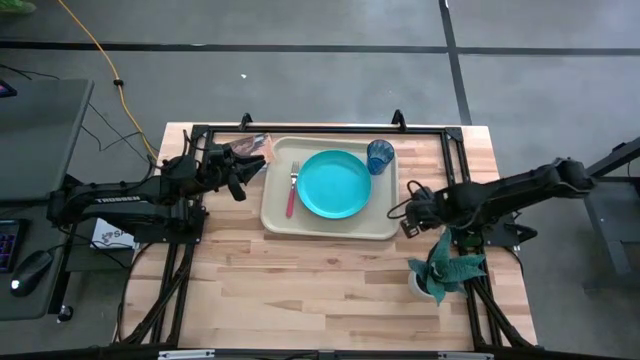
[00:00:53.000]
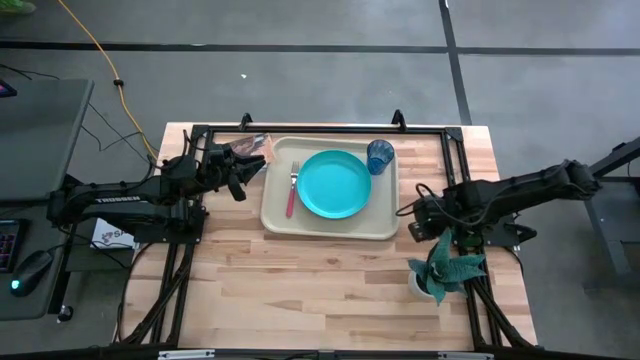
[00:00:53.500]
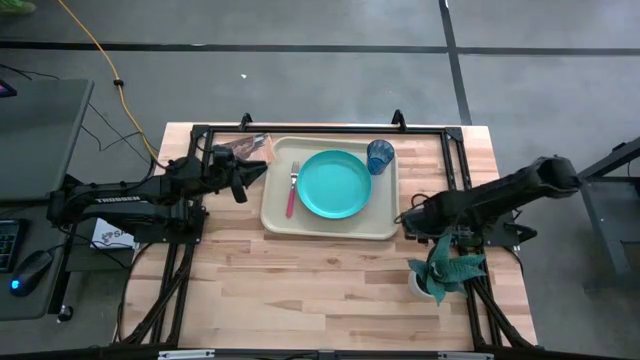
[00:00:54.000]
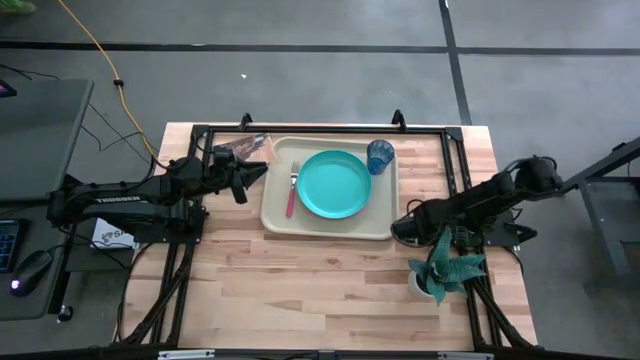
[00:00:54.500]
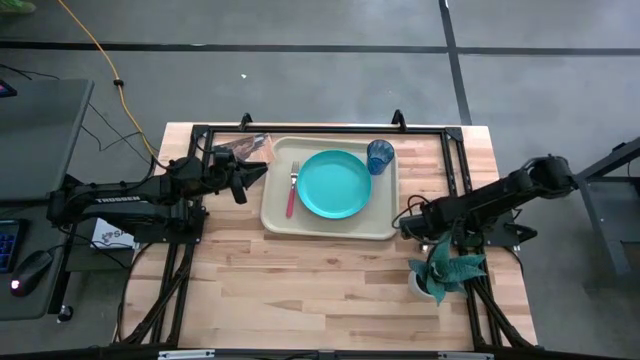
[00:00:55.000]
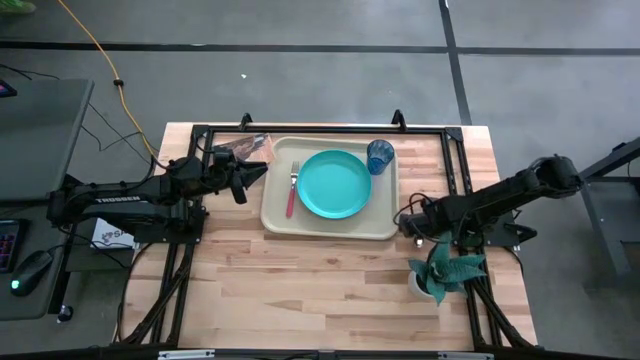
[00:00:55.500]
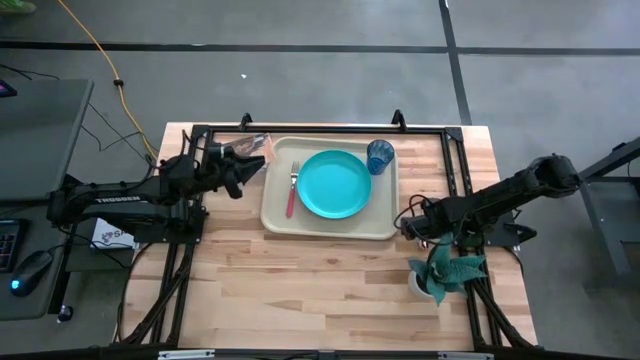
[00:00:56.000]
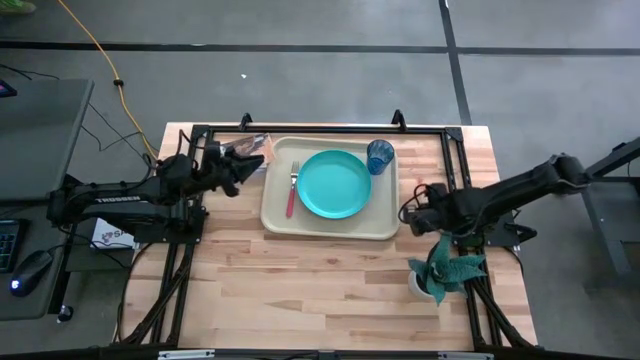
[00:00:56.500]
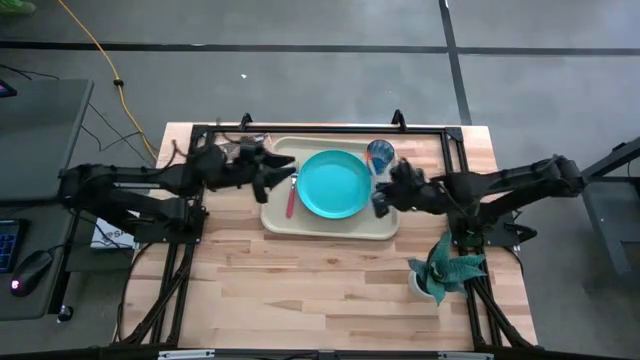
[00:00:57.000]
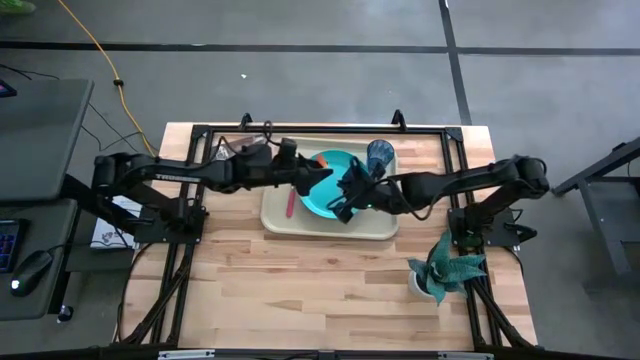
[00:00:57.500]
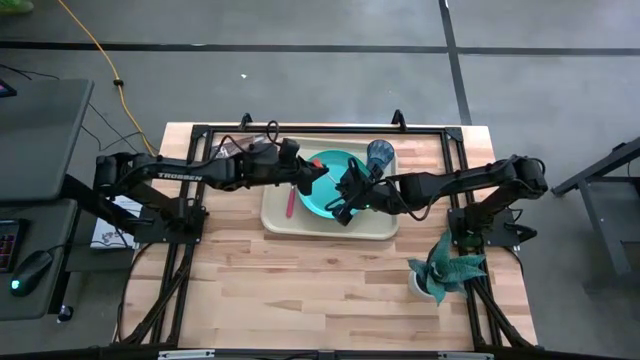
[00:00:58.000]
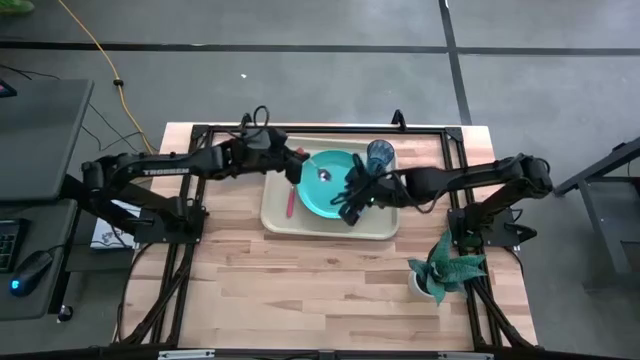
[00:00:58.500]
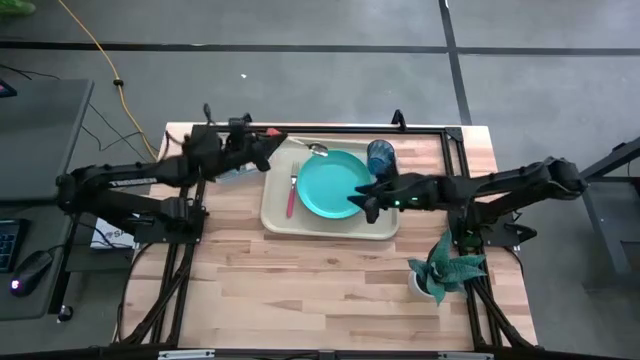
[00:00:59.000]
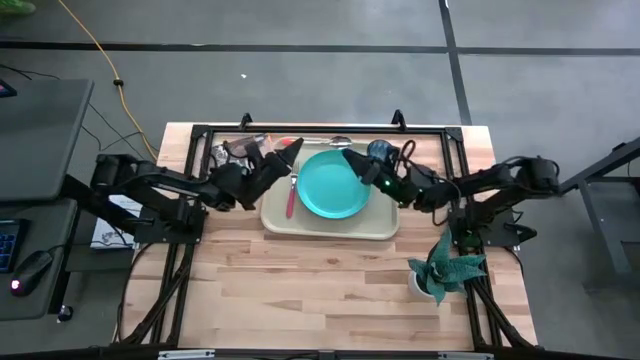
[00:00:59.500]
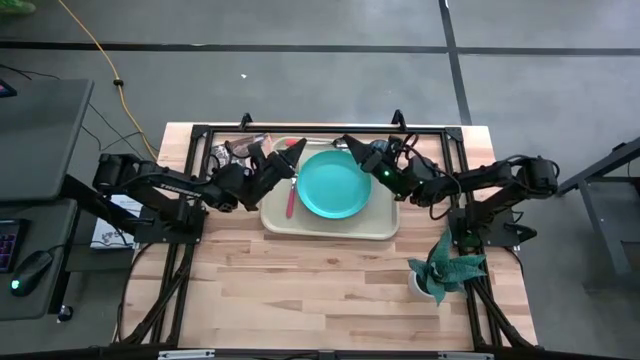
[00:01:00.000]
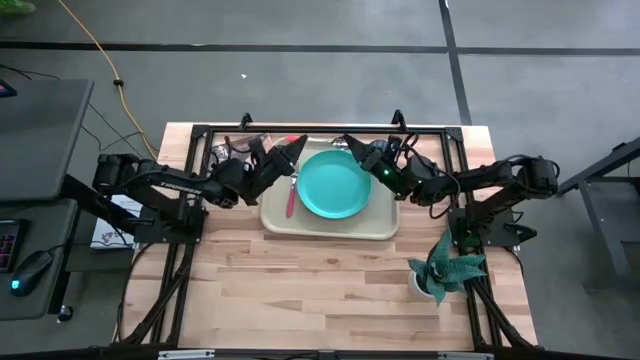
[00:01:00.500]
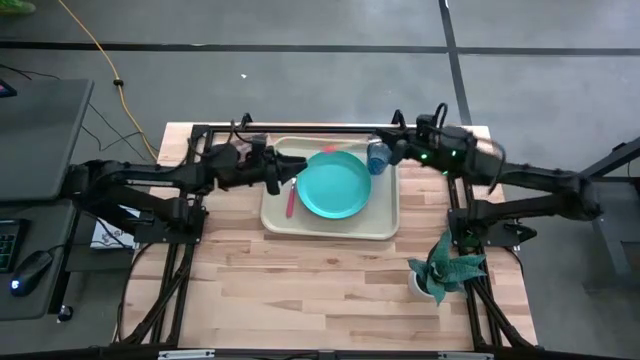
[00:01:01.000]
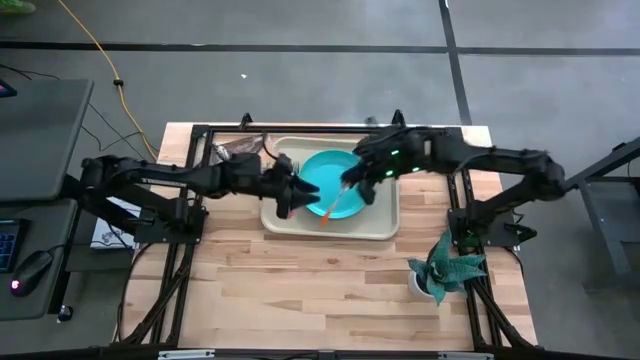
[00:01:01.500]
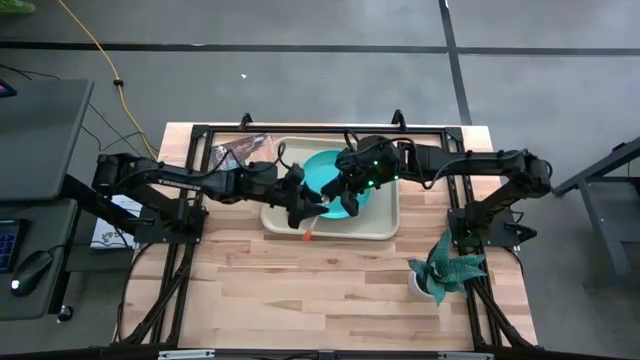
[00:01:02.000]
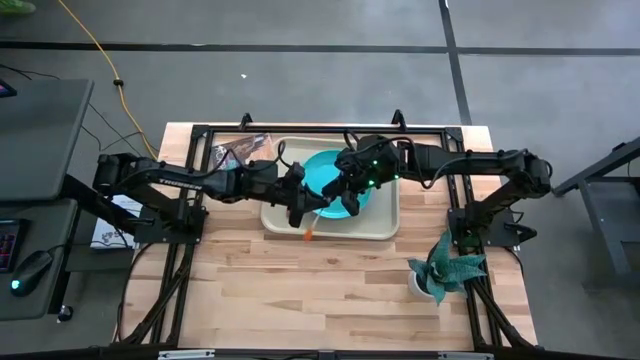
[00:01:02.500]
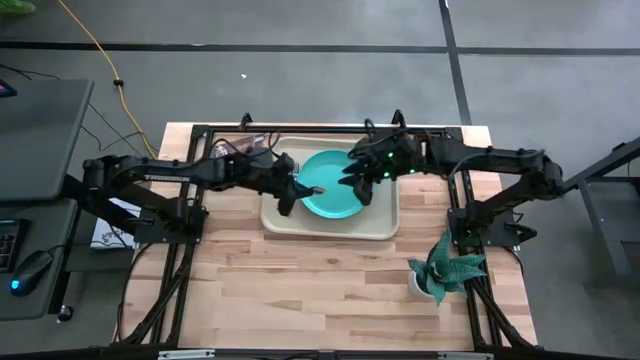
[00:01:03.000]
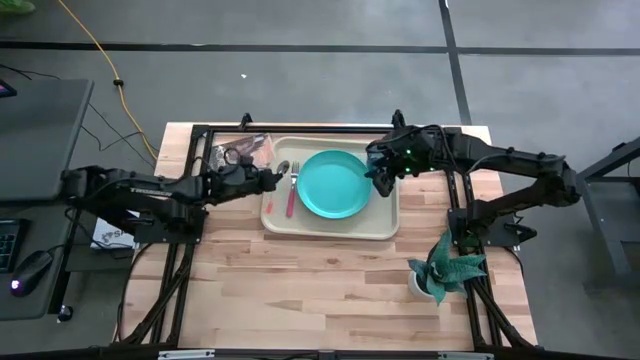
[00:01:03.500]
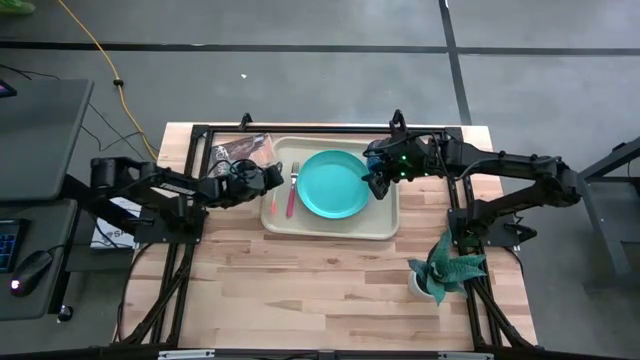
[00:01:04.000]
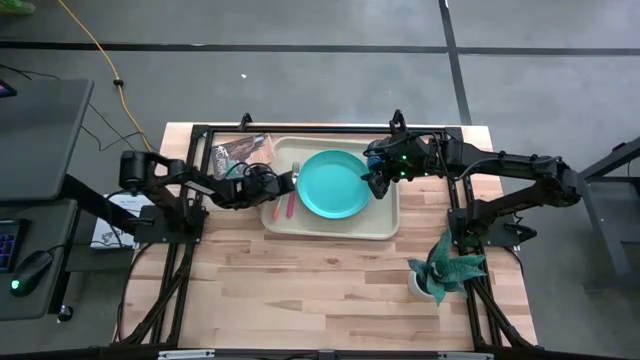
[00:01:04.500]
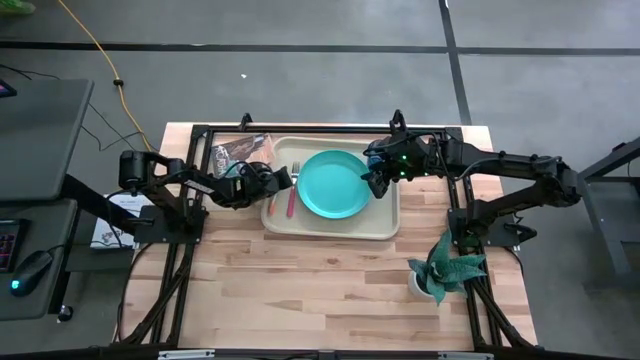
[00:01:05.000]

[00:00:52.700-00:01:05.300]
Task: Pick and place plate/cup/fork/spoon on tray
Put the orange spoon on the gray tray

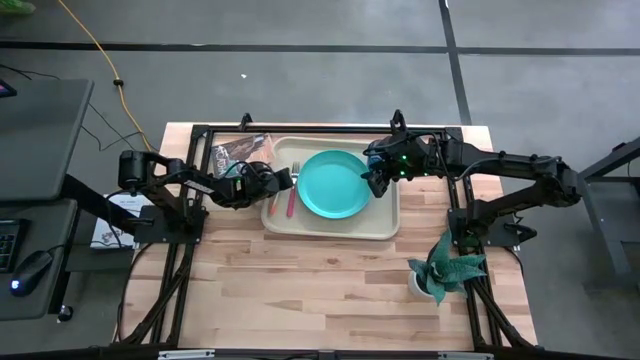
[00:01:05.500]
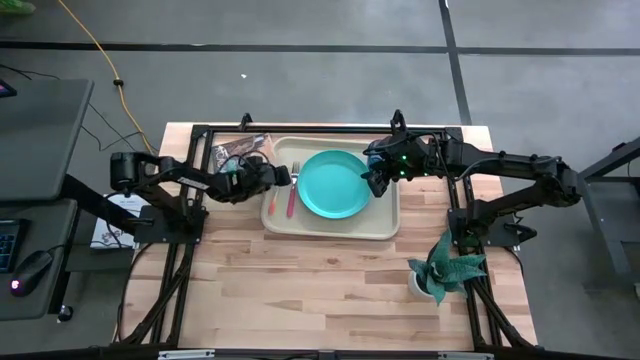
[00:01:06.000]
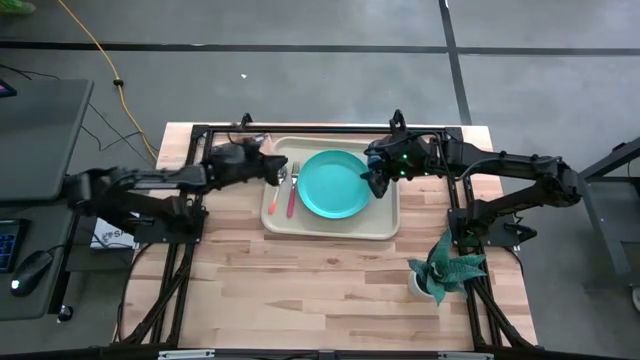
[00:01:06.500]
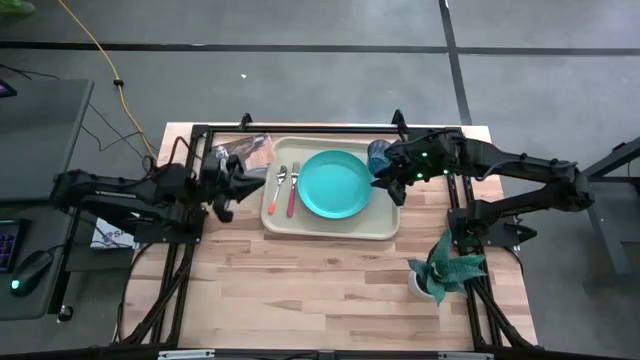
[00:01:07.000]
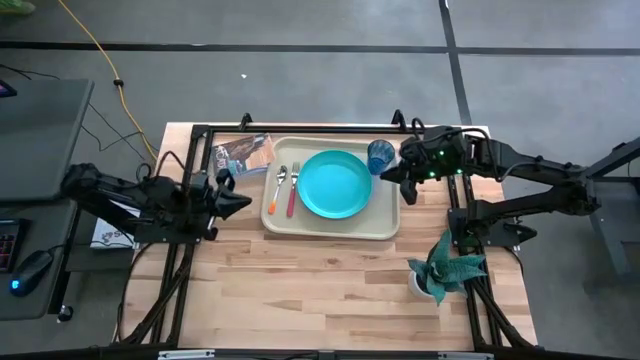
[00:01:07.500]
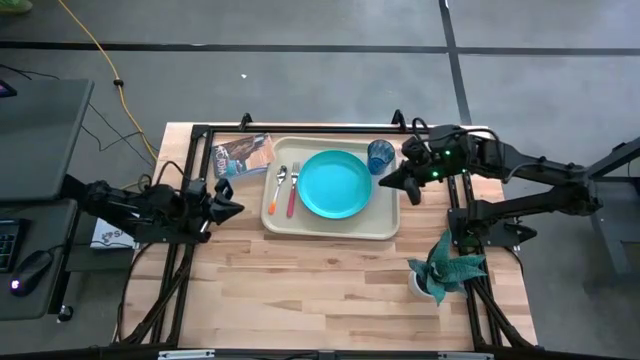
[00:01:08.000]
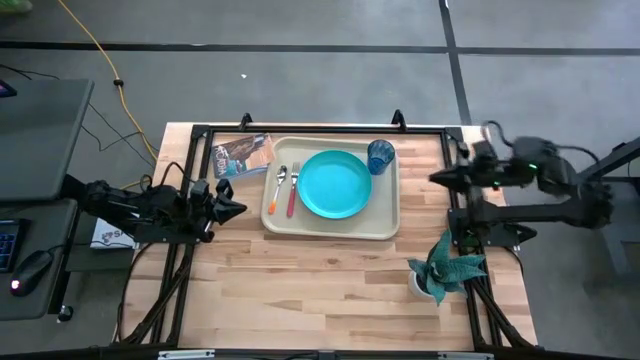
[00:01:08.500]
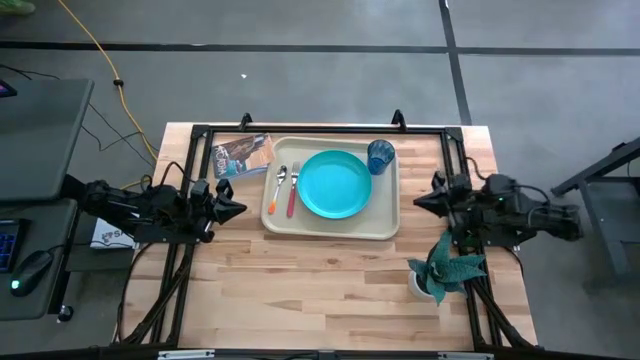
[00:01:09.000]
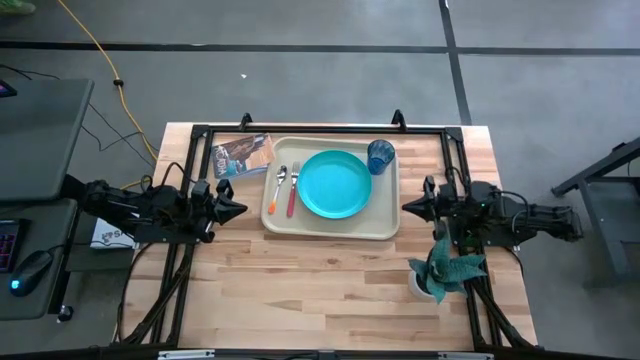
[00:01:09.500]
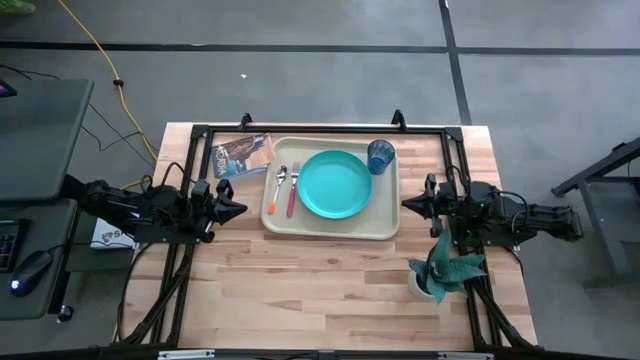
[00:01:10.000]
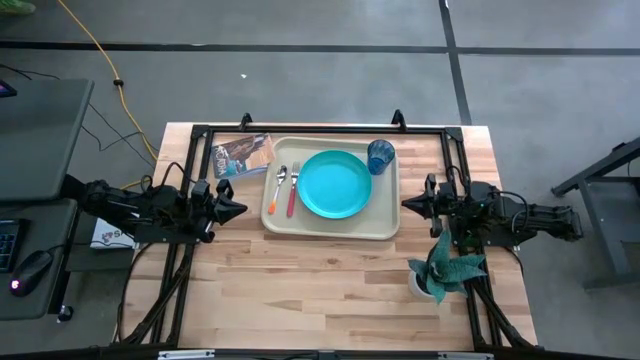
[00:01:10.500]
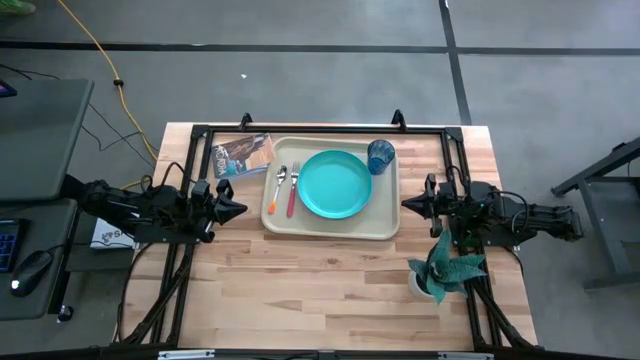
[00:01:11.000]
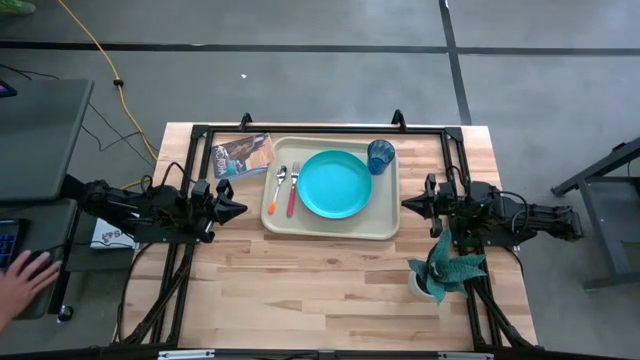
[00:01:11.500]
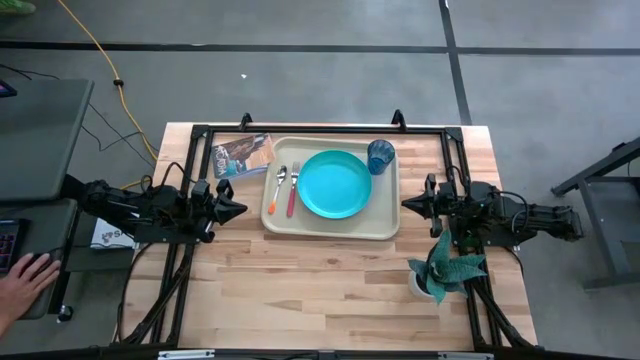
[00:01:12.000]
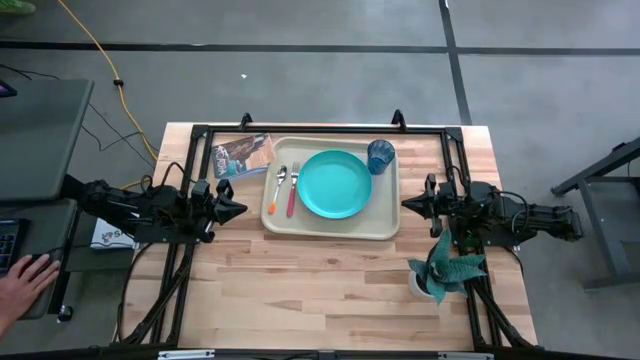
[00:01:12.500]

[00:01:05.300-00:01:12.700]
Return to home position

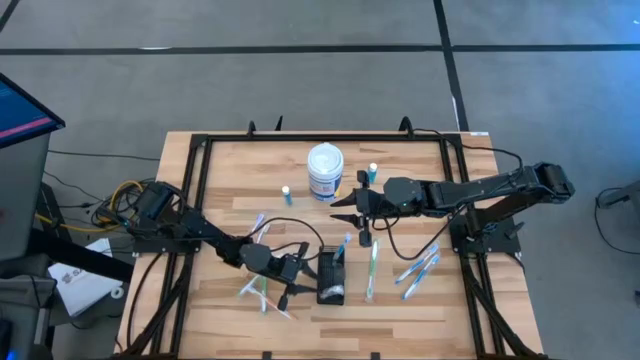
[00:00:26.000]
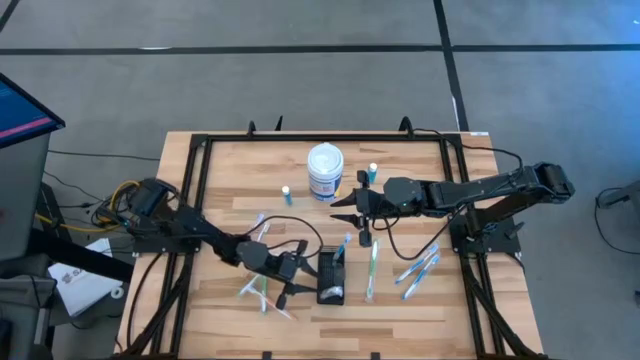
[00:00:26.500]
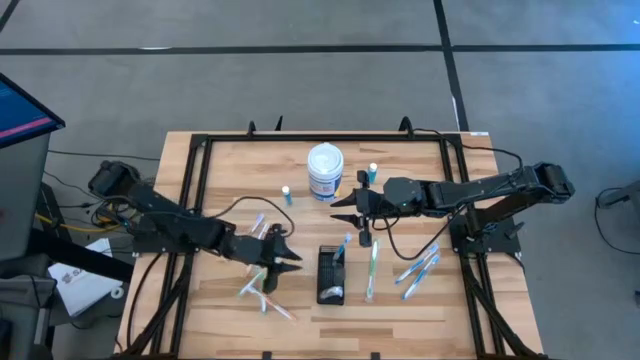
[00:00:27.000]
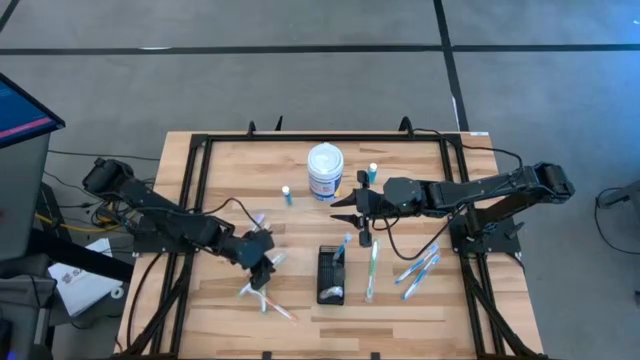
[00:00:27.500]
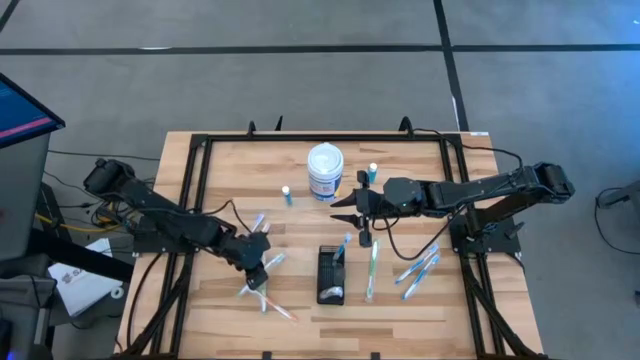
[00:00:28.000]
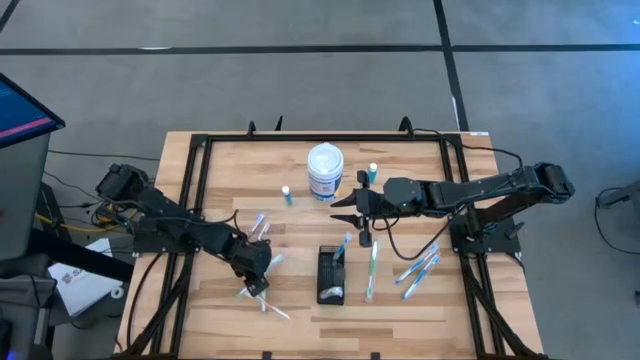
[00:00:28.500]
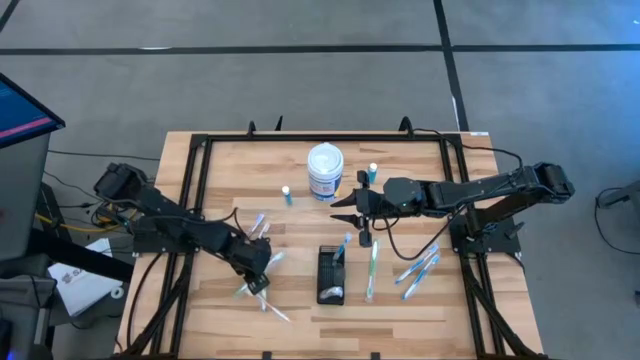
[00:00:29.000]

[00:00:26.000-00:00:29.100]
Task: Pick & Place toothbrushing station
Put the left green toothbrush into the black mesh organizer
